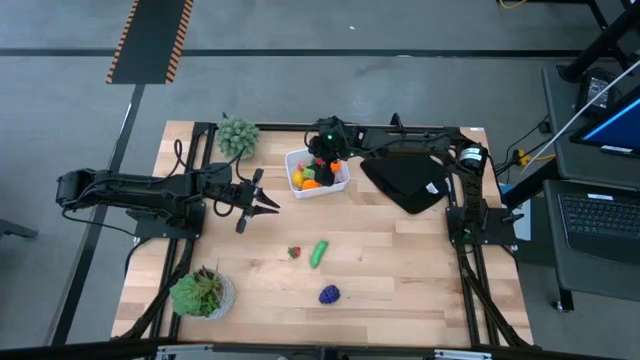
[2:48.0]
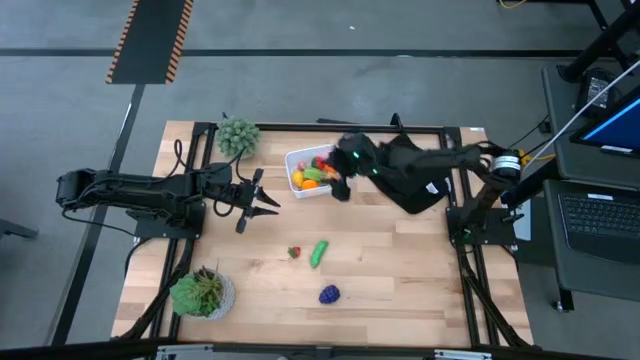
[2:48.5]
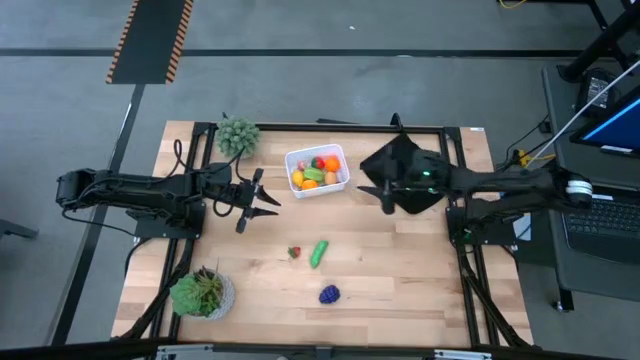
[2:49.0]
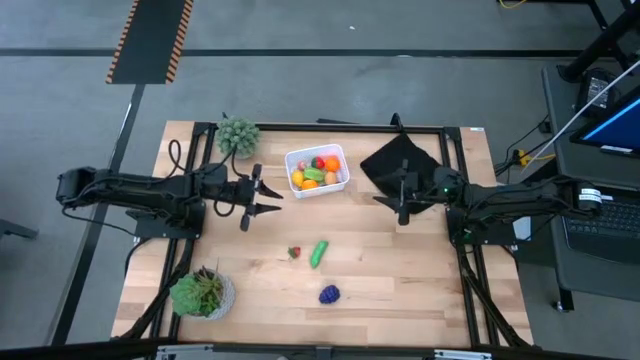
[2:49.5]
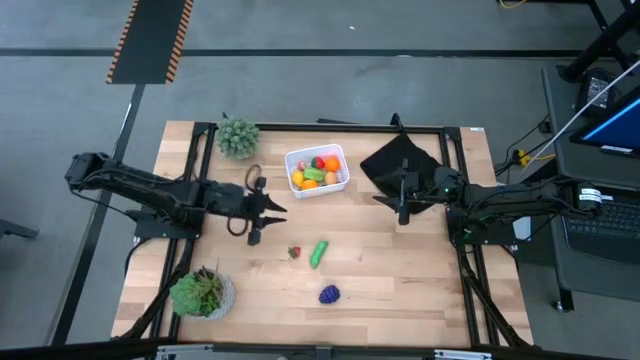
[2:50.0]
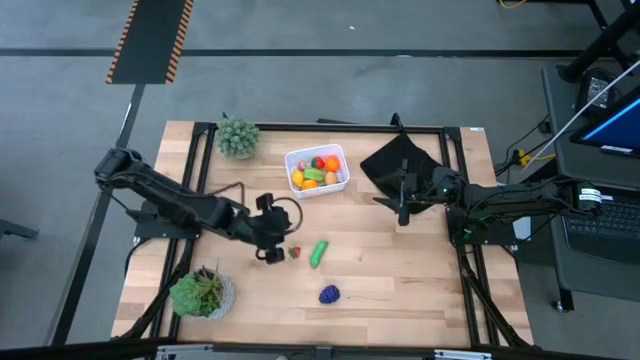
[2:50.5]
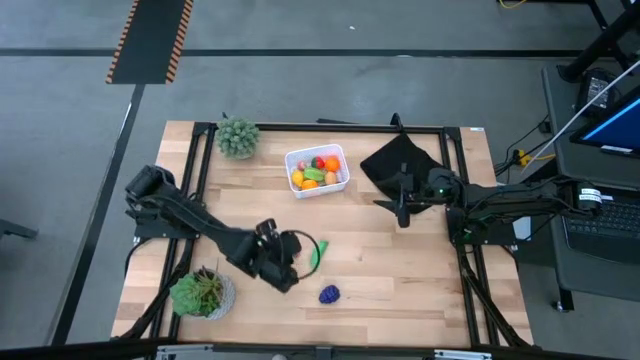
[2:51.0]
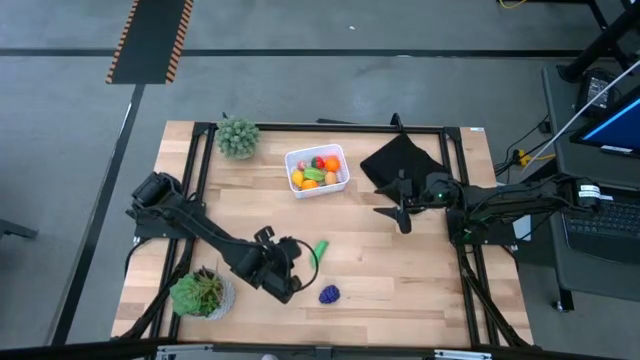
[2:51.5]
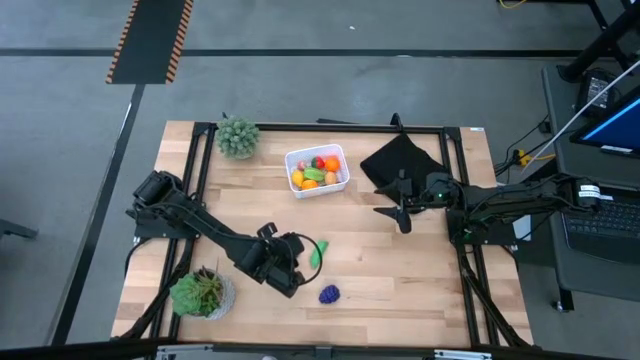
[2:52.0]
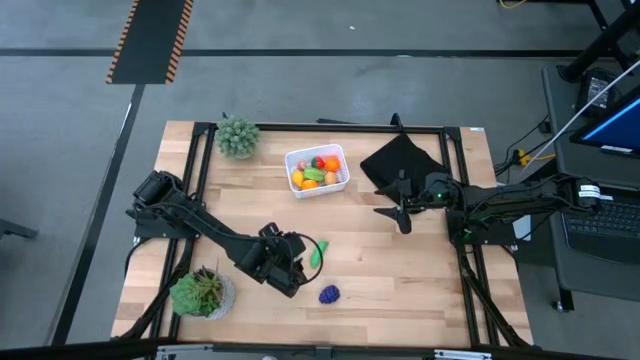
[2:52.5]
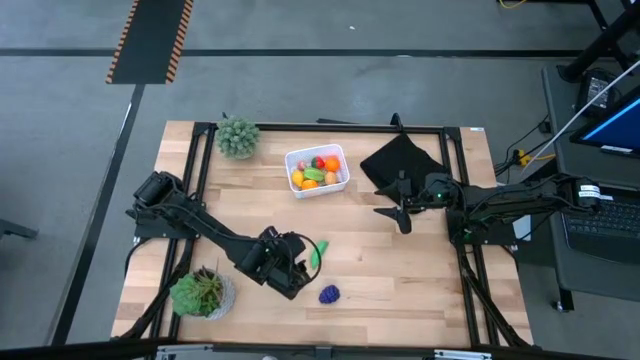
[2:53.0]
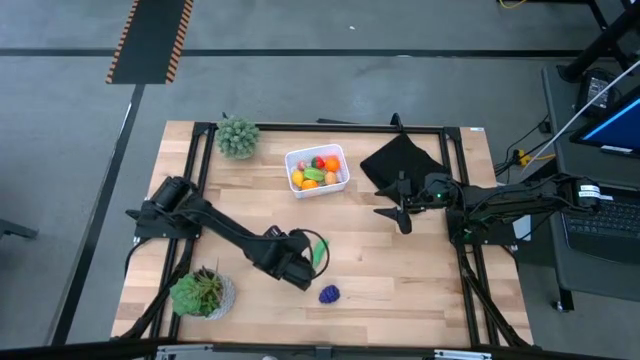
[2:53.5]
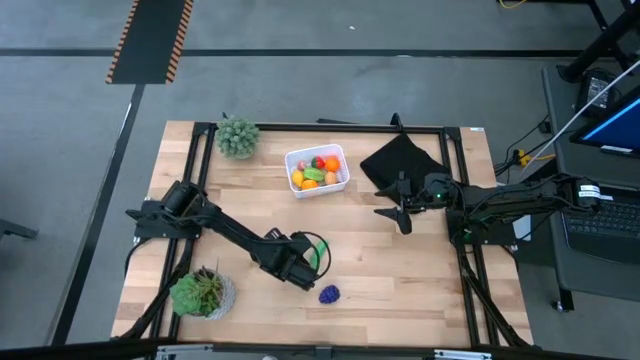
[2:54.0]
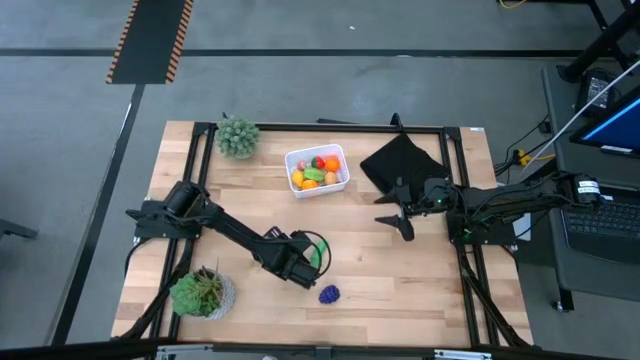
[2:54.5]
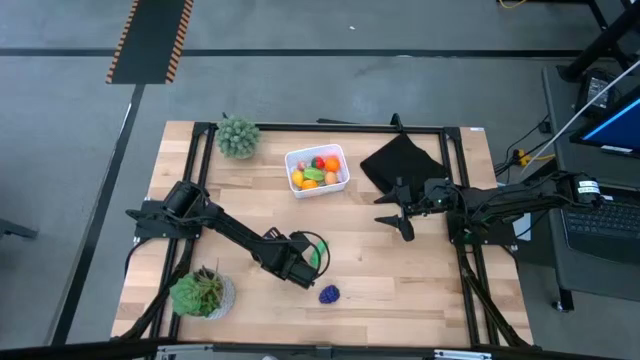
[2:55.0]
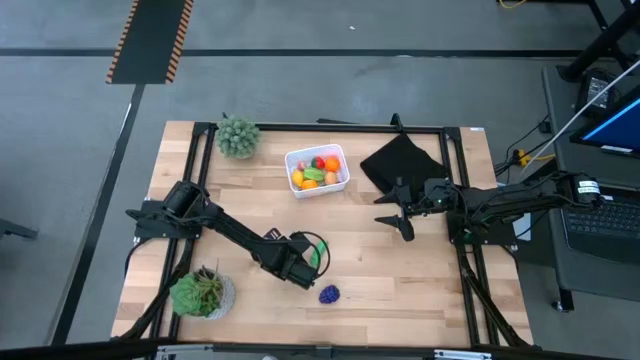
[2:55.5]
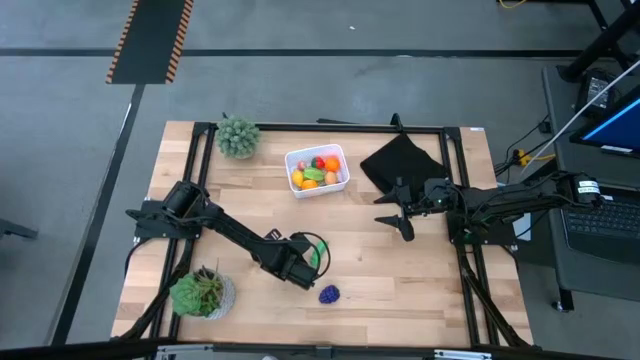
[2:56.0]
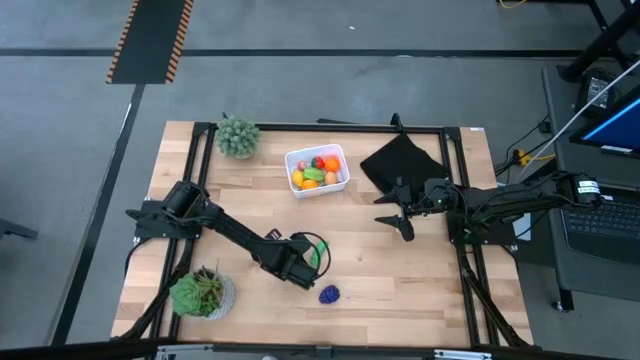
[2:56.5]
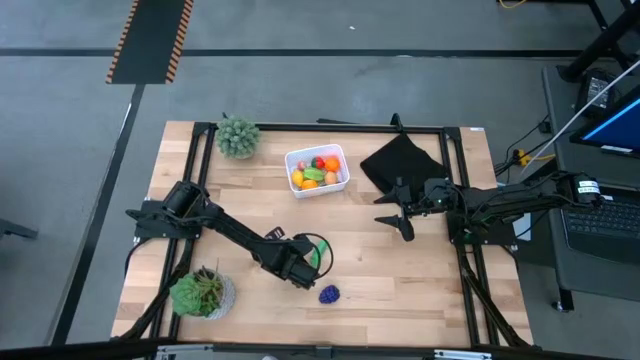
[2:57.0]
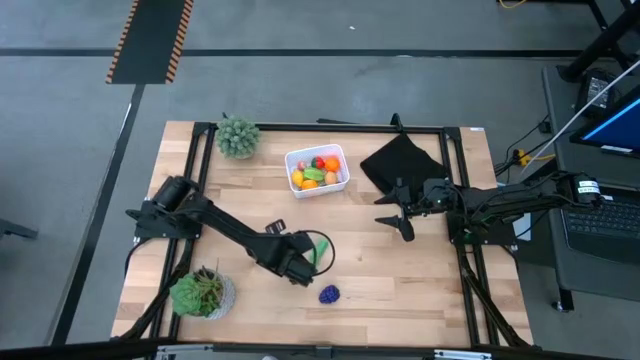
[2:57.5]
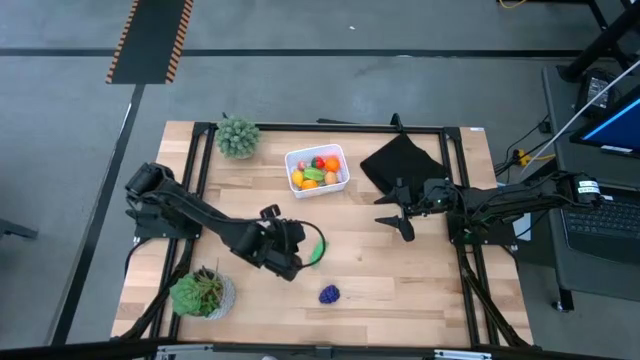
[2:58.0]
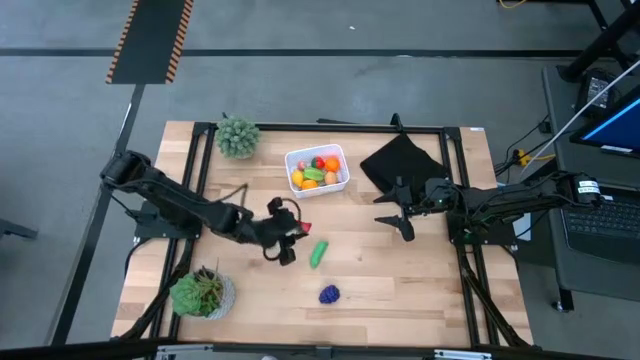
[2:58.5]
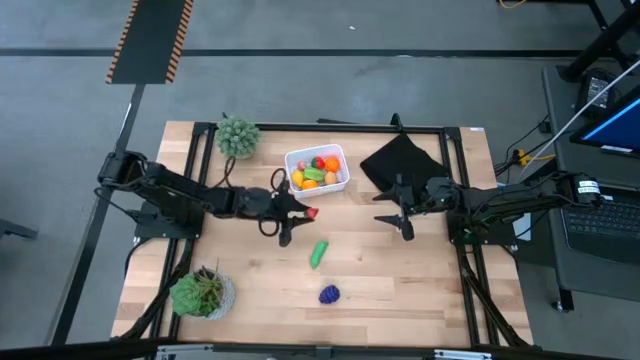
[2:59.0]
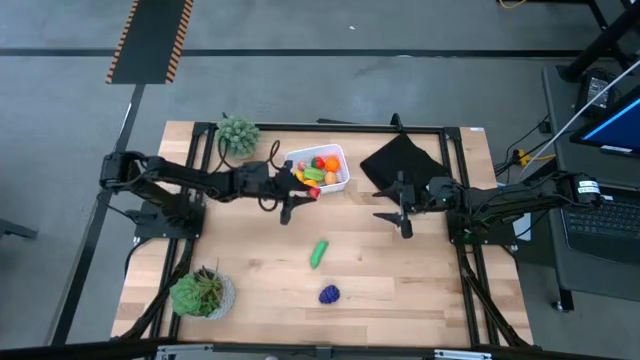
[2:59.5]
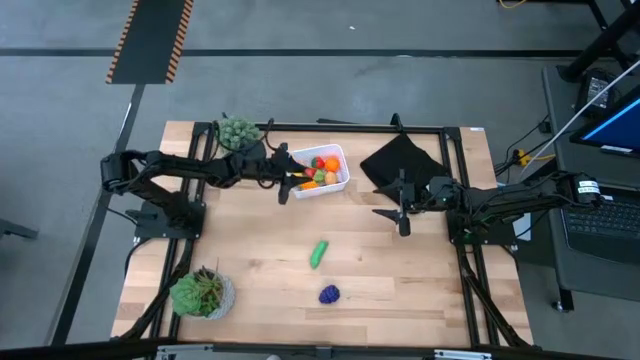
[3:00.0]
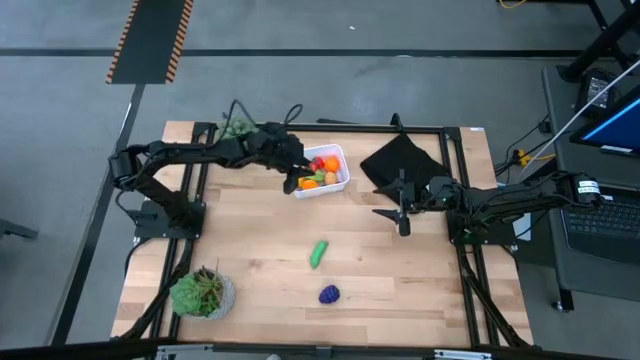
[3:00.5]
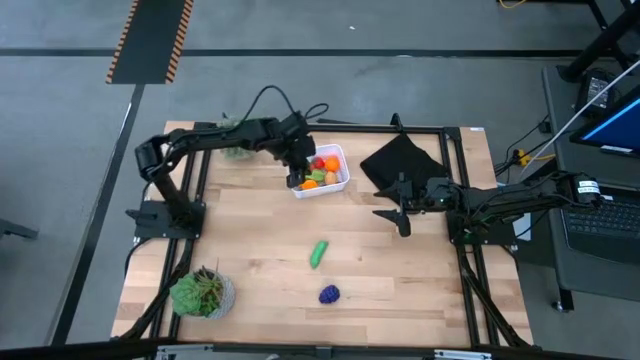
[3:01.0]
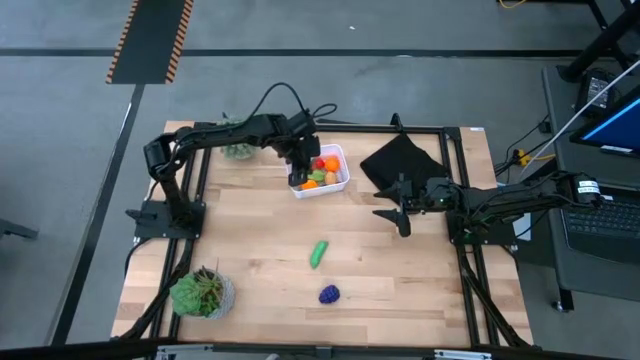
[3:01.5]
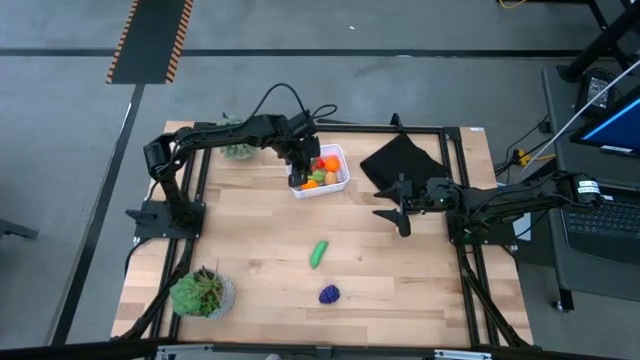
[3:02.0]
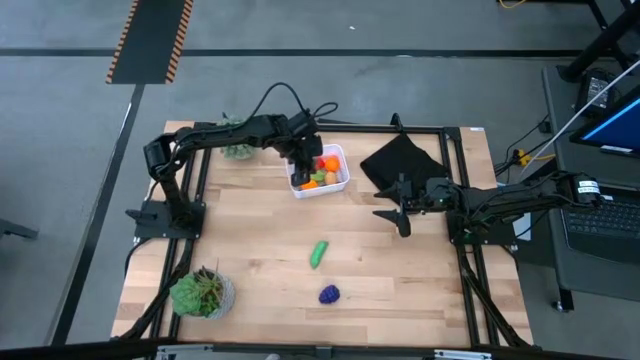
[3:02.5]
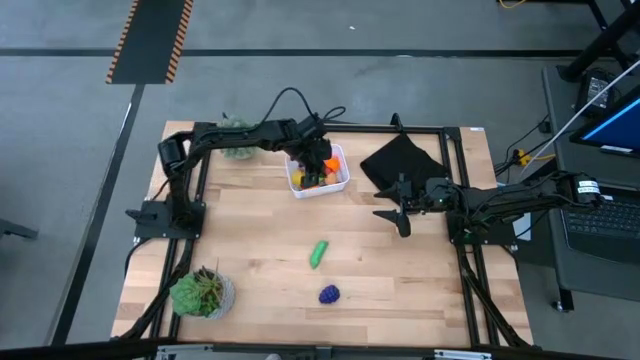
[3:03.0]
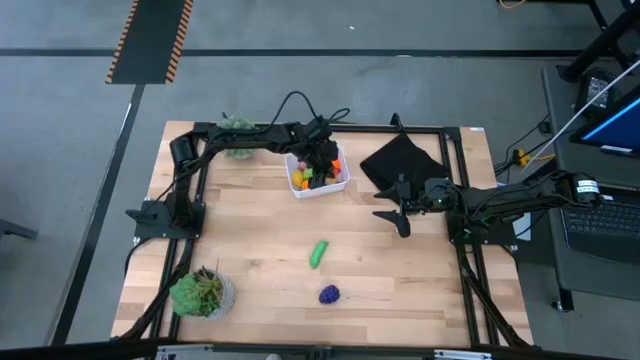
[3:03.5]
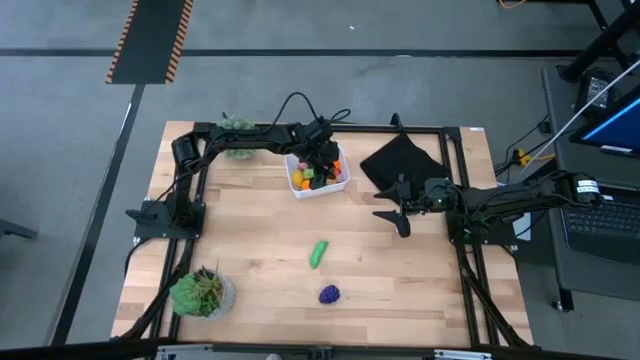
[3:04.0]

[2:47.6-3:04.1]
Task: Pick and placing Produce into tupperware
Put the strawberry into the white bin

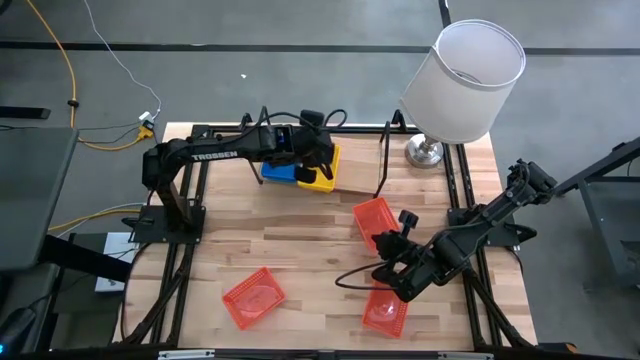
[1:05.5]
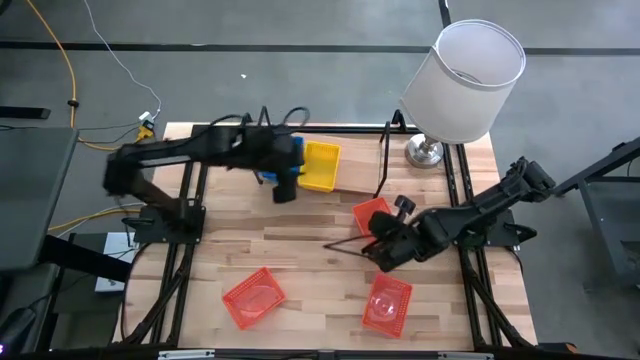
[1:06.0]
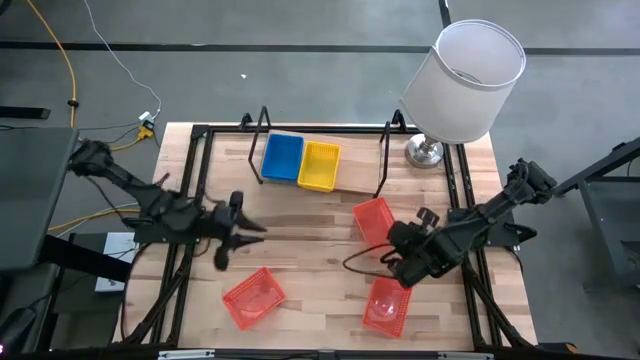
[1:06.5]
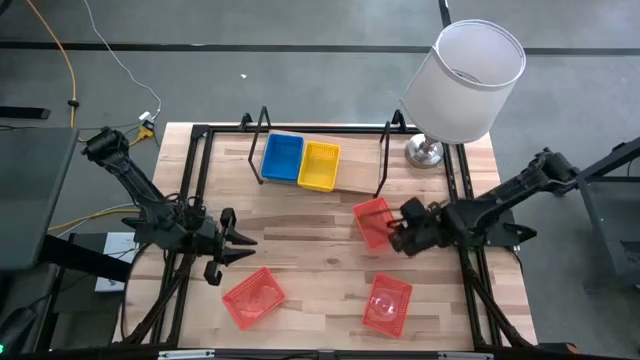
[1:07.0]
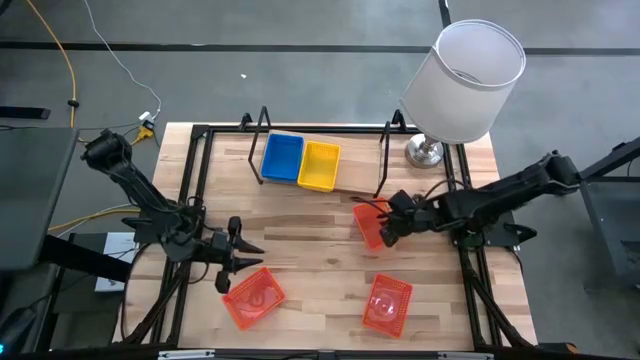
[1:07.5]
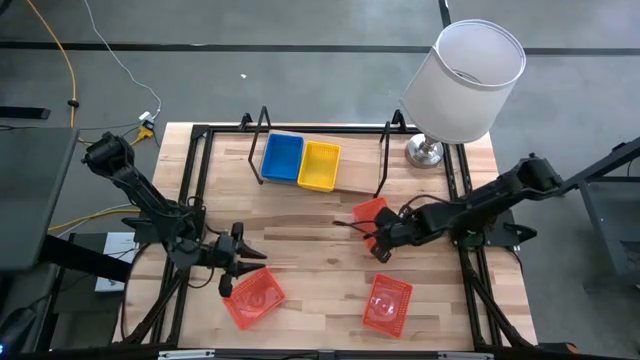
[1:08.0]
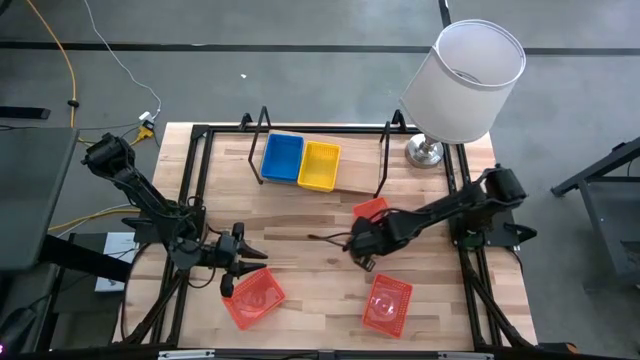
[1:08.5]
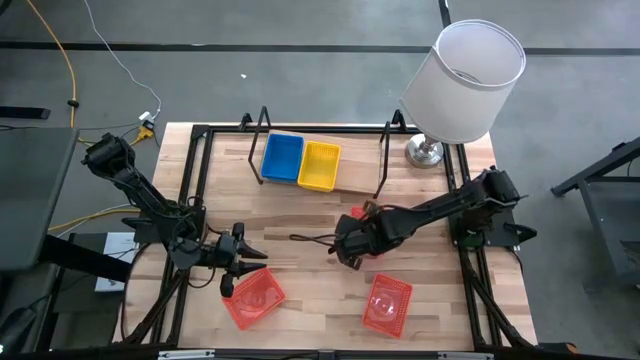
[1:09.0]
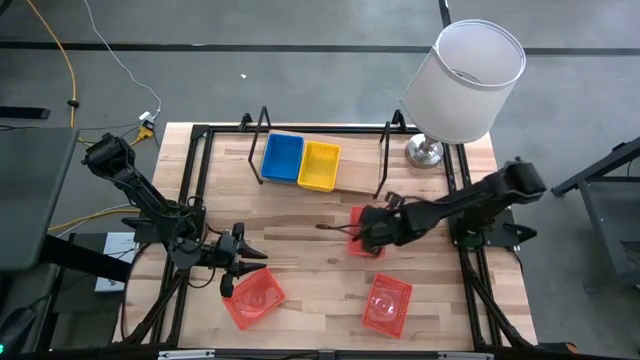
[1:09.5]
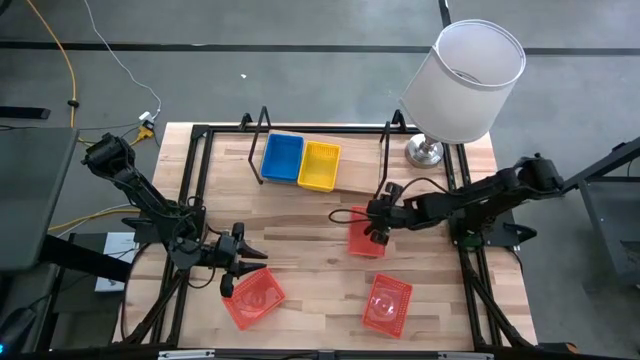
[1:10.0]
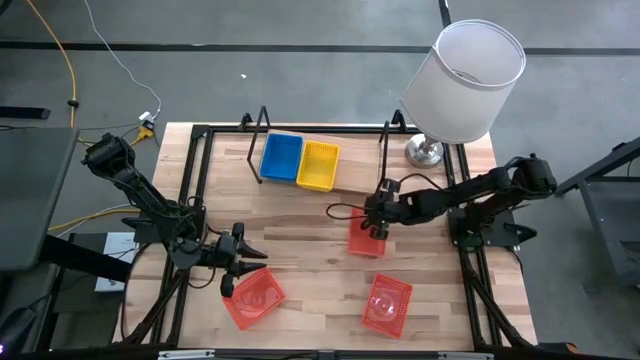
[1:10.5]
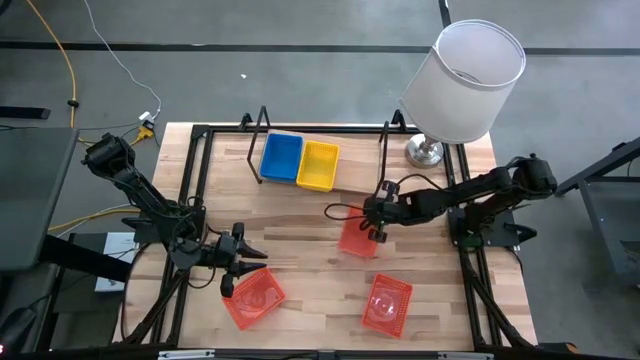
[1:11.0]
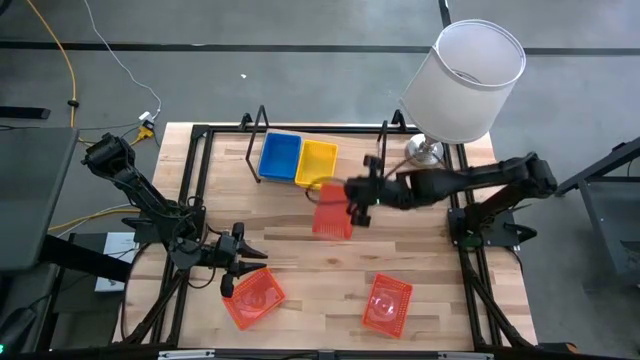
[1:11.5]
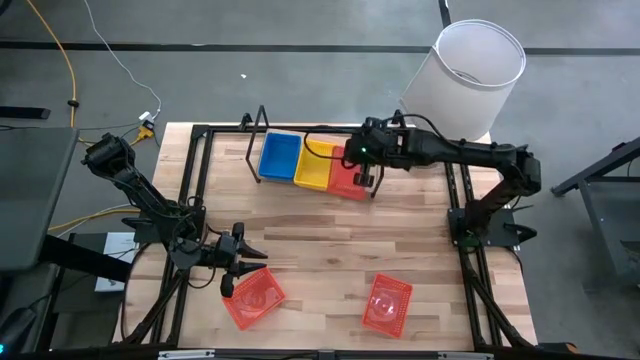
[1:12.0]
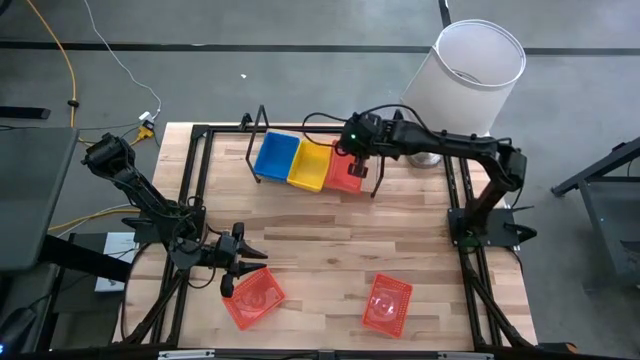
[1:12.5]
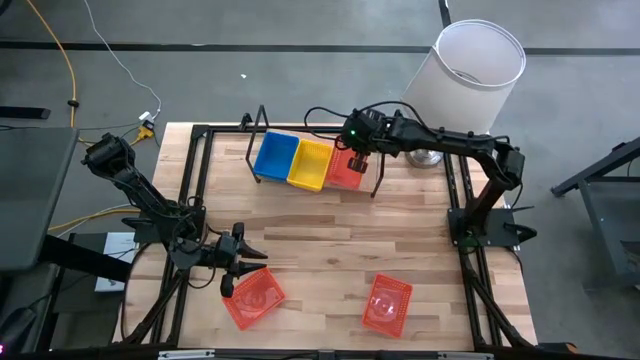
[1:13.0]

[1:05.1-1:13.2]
Task: Stack baskets on shelf by color
Put the top orange bin on the shelf
